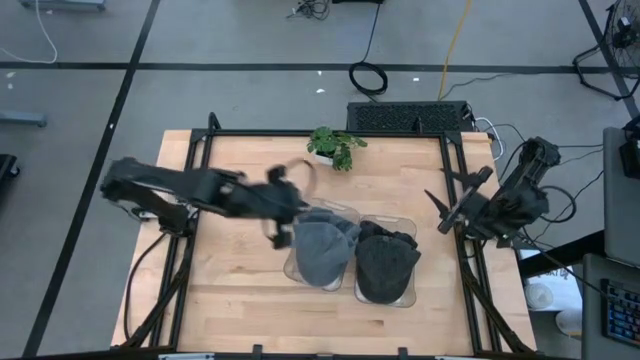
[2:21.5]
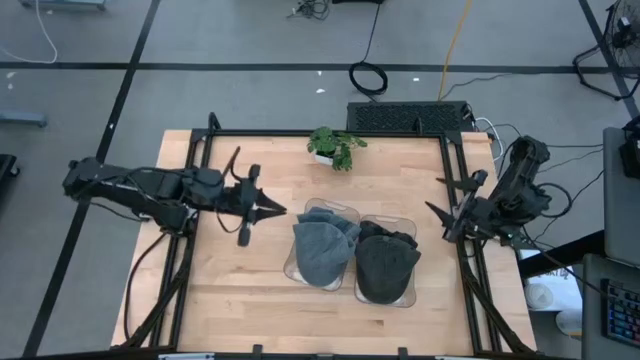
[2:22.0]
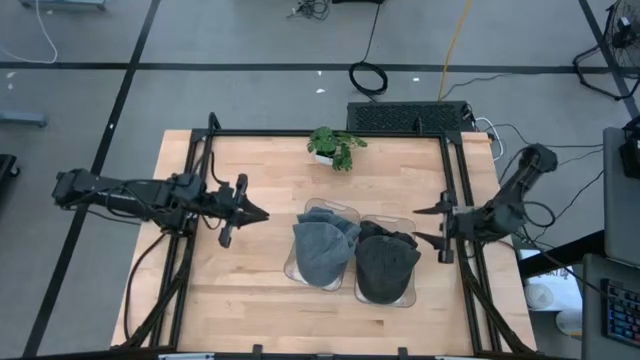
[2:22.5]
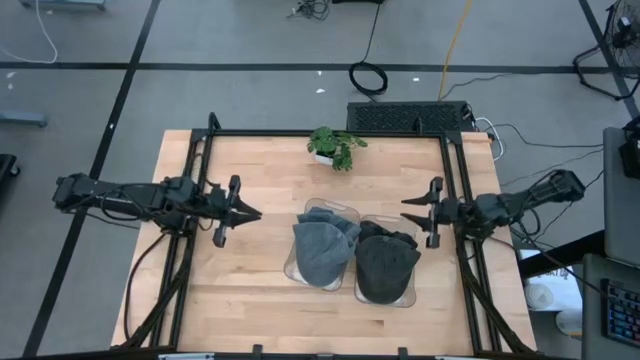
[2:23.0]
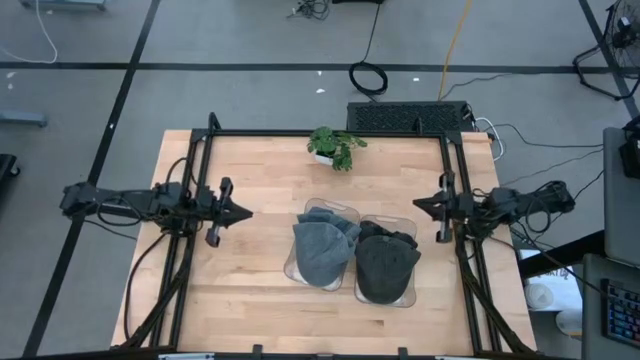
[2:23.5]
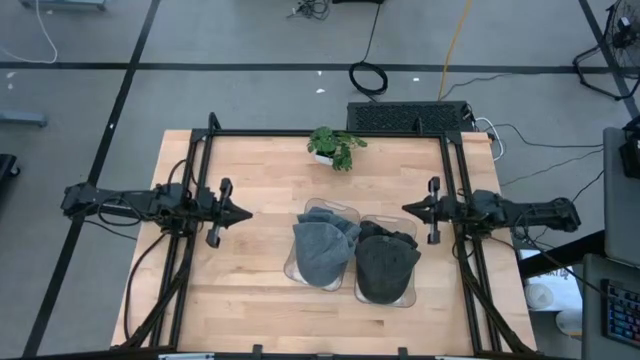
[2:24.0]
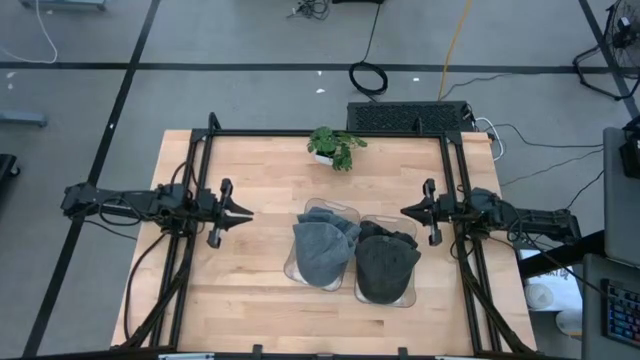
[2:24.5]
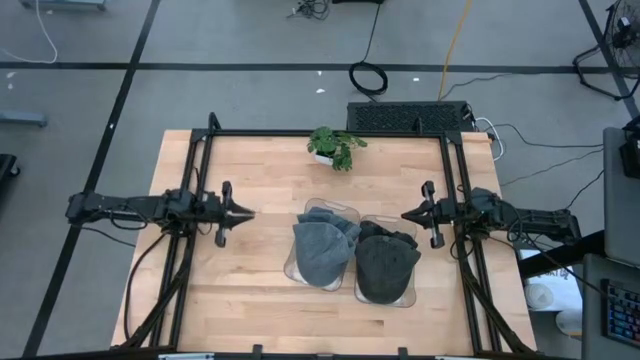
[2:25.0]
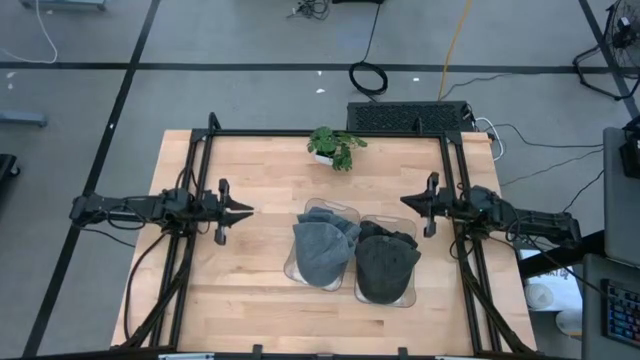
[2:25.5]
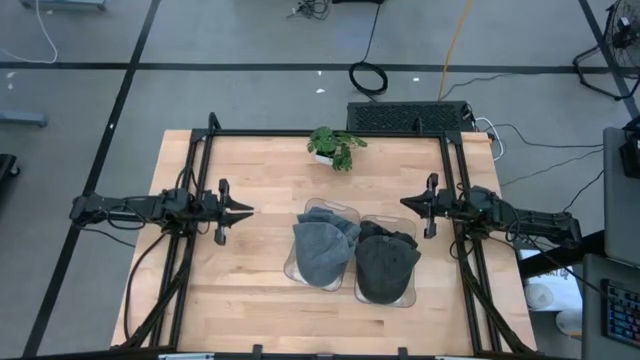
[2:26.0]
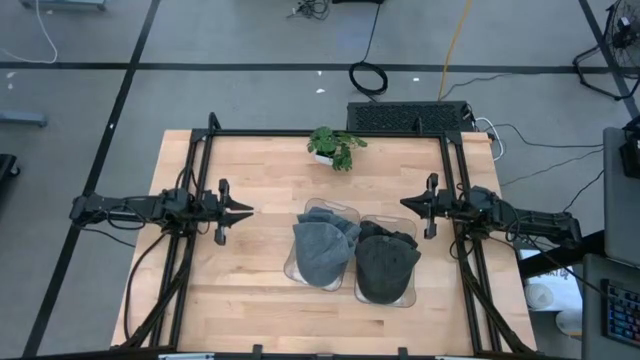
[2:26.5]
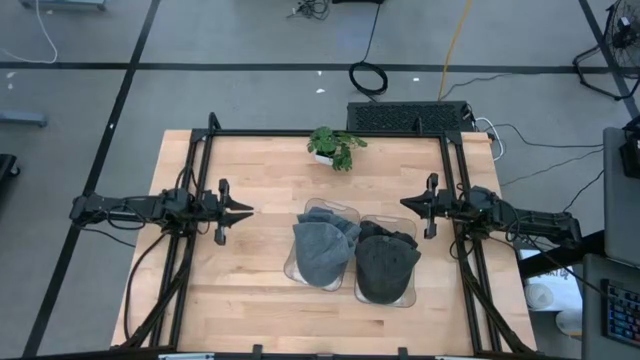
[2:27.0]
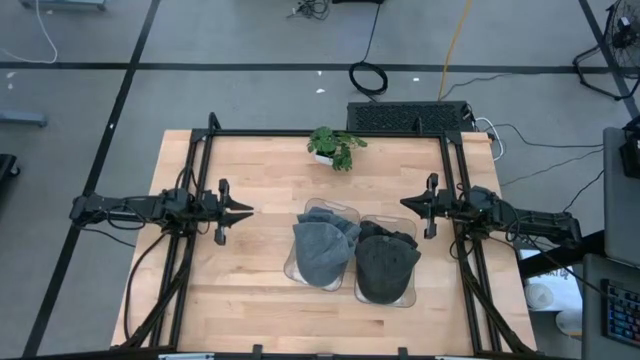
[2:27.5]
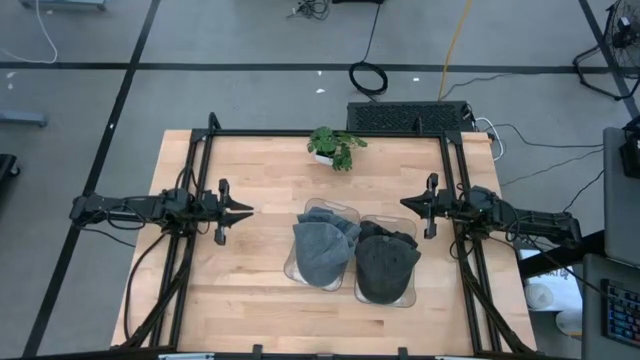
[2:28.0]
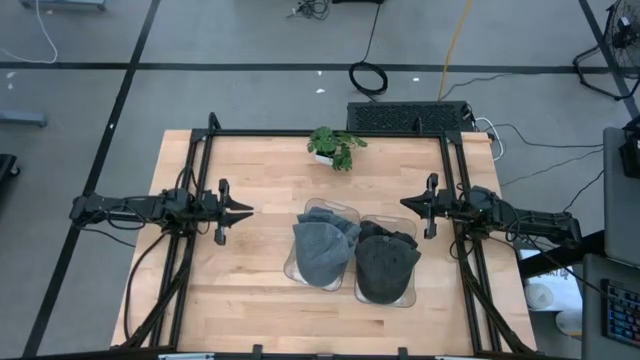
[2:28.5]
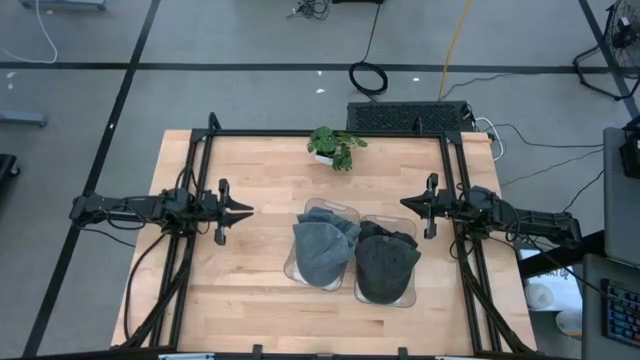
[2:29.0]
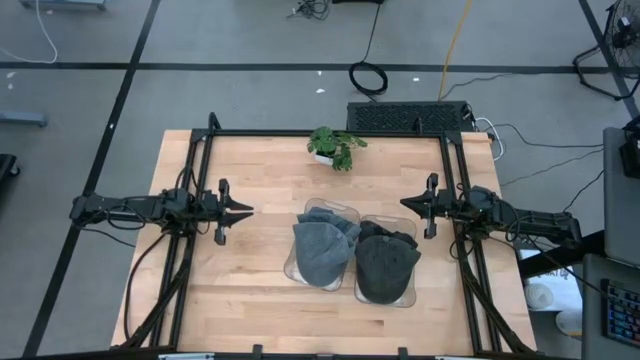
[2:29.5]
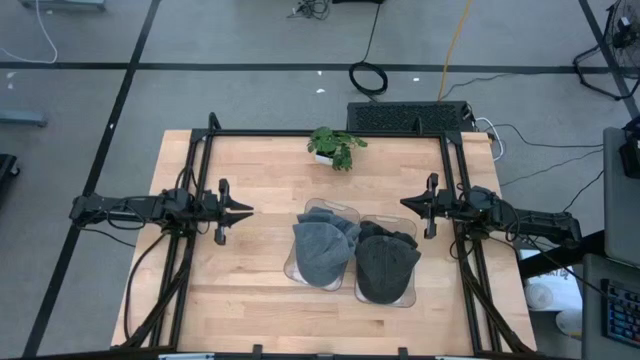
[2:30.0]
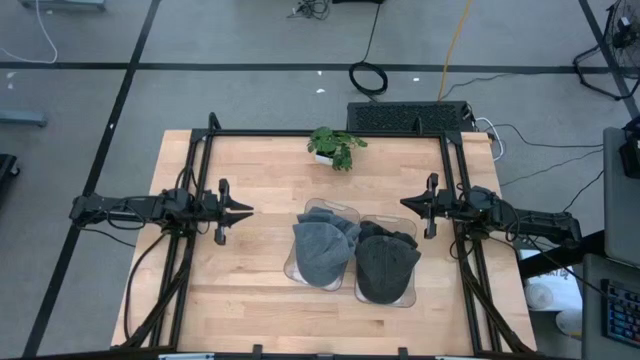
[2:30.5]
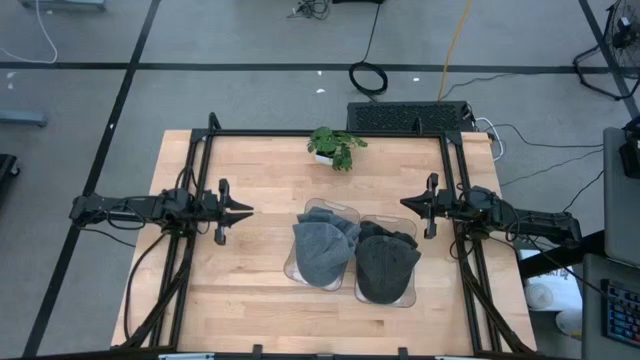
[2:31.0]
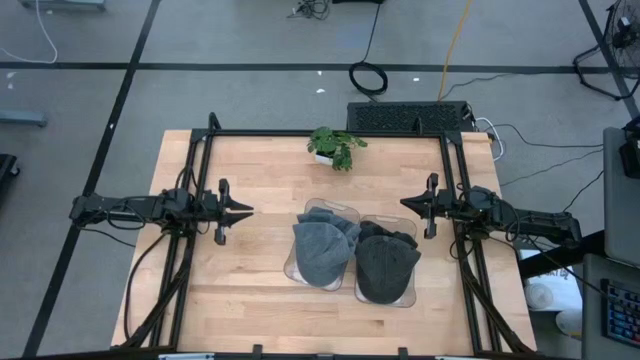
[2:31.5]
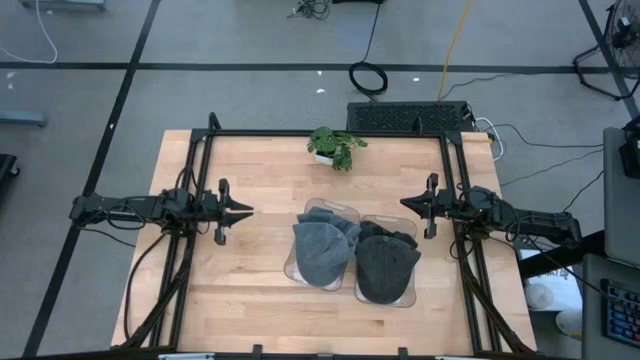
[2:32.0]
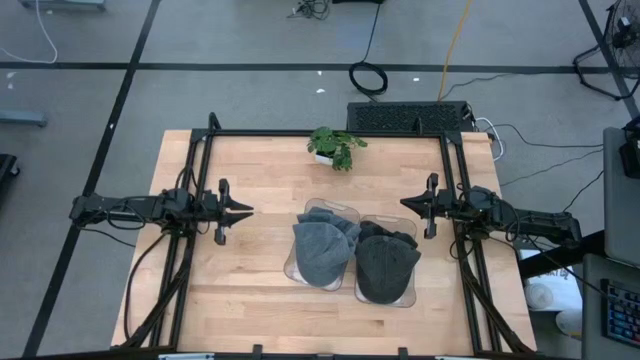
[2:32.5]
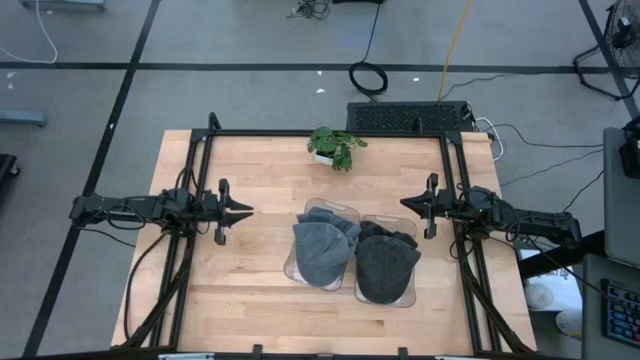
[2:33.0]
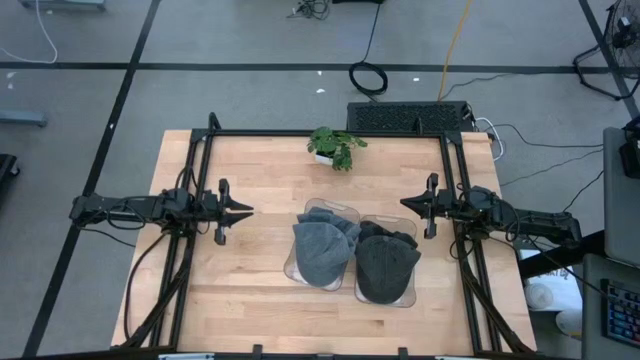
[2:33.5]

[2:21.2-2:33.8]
Task: Pick & Place hat
Return to Home Position

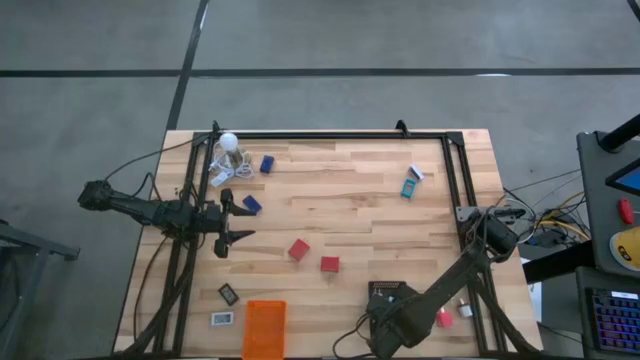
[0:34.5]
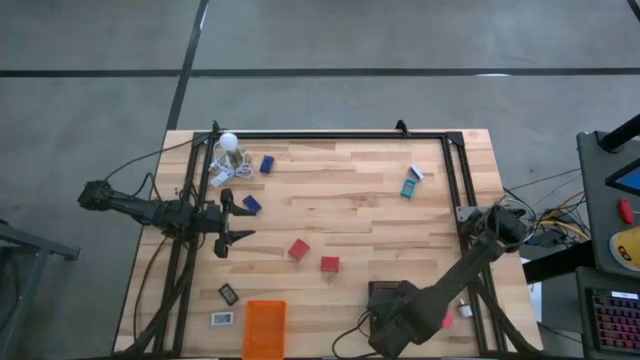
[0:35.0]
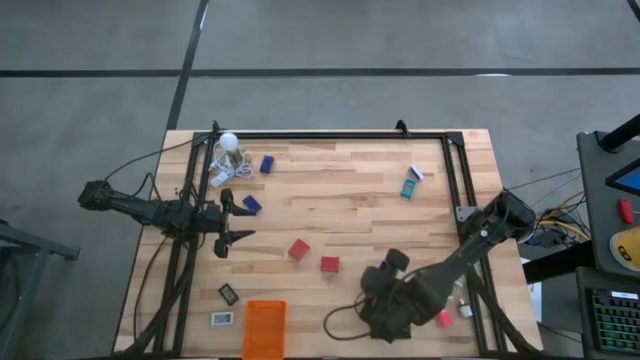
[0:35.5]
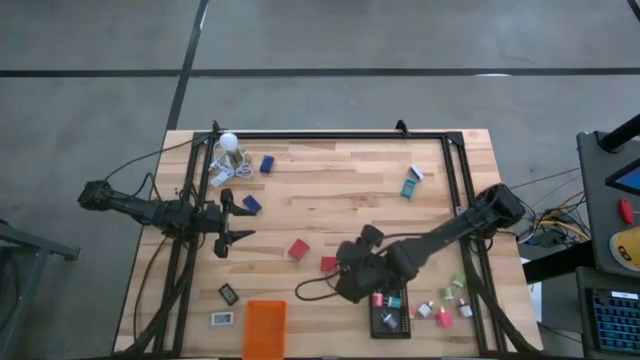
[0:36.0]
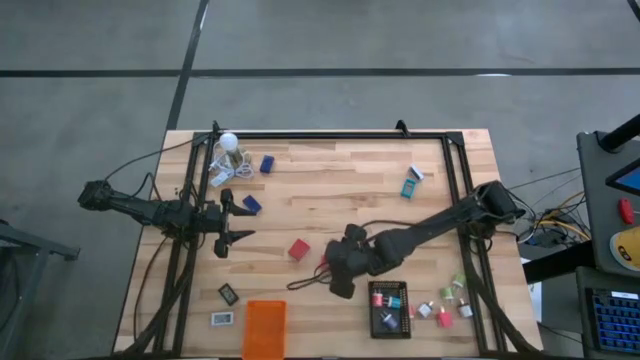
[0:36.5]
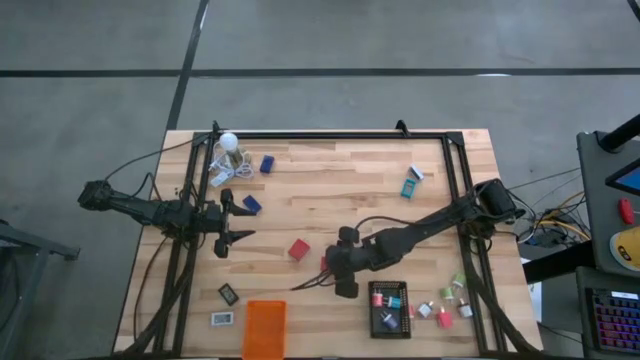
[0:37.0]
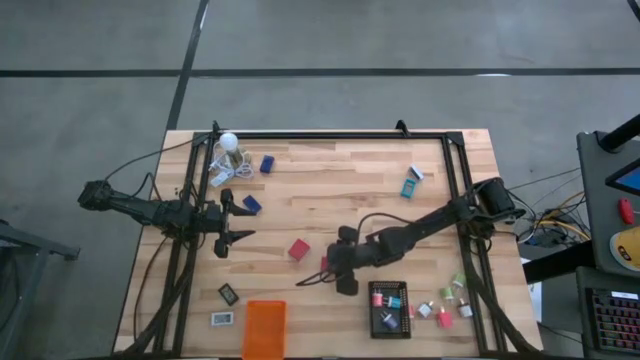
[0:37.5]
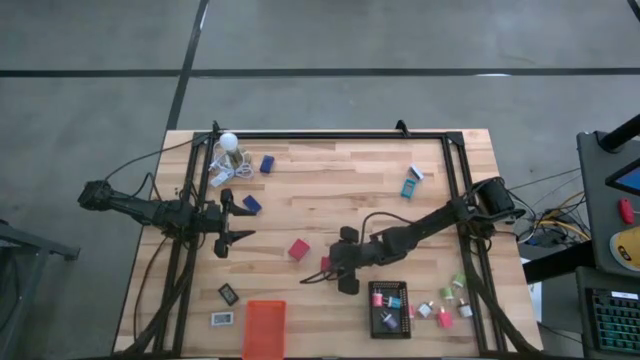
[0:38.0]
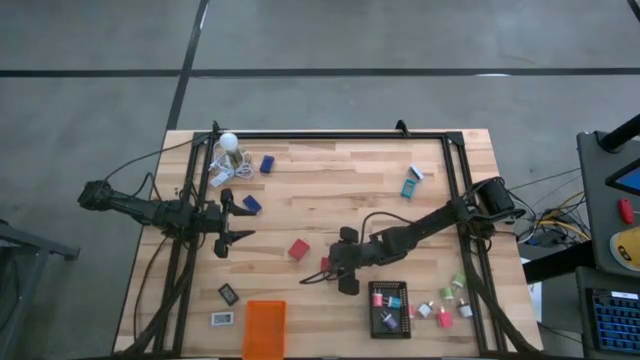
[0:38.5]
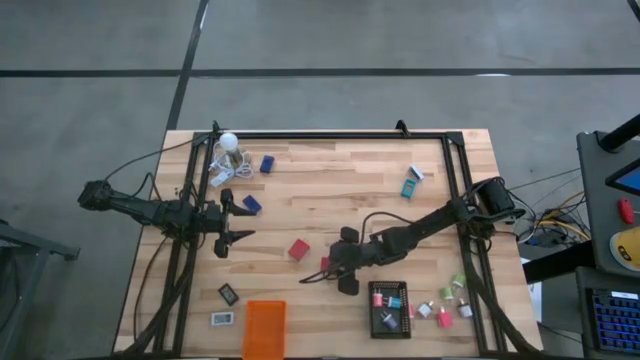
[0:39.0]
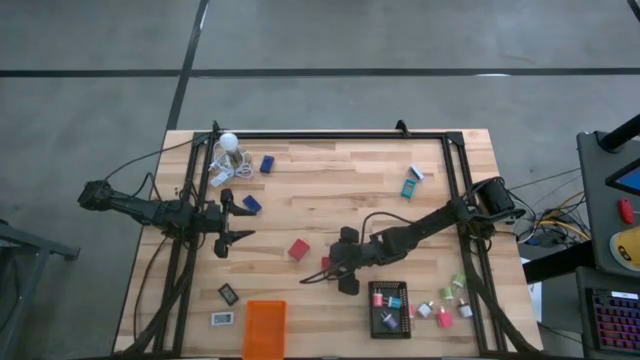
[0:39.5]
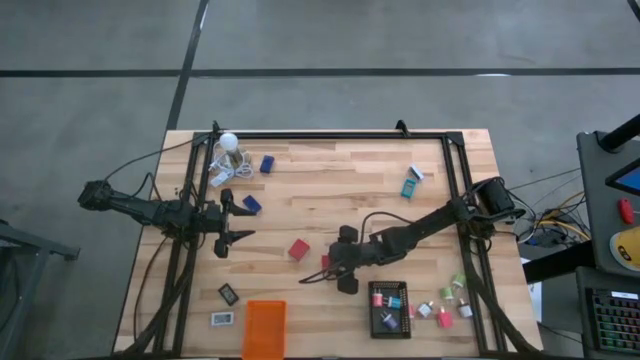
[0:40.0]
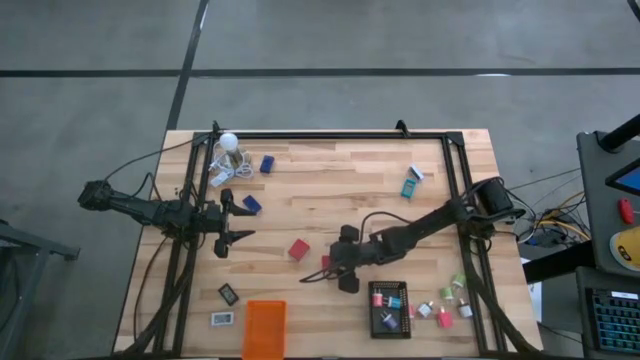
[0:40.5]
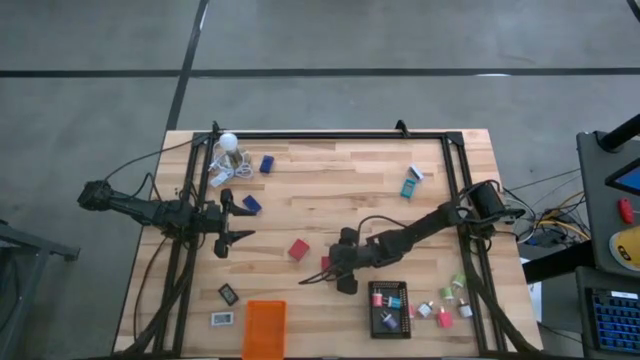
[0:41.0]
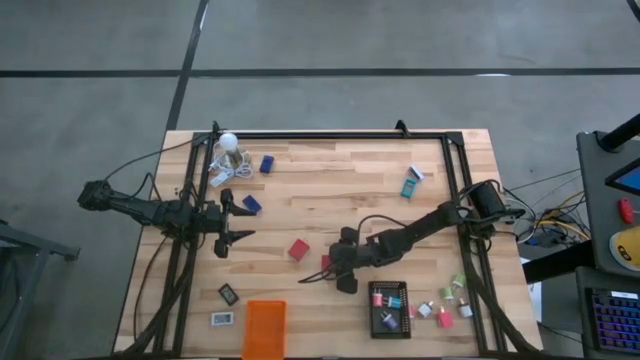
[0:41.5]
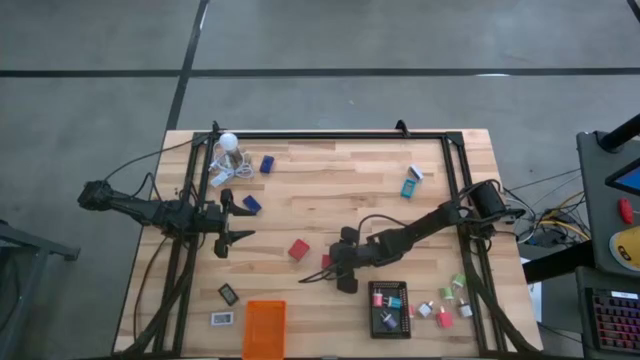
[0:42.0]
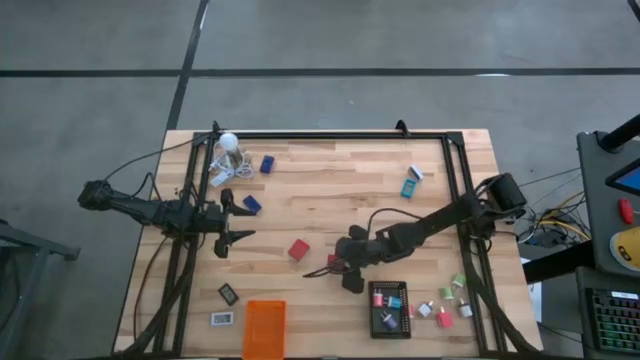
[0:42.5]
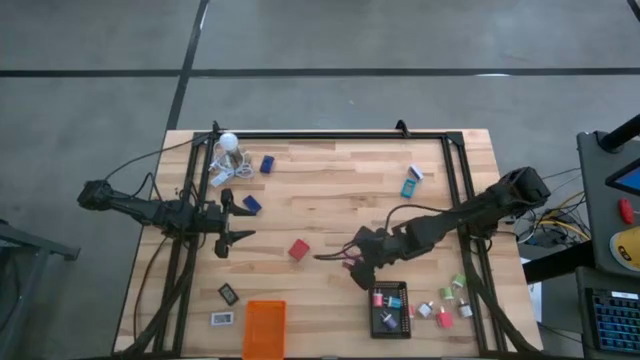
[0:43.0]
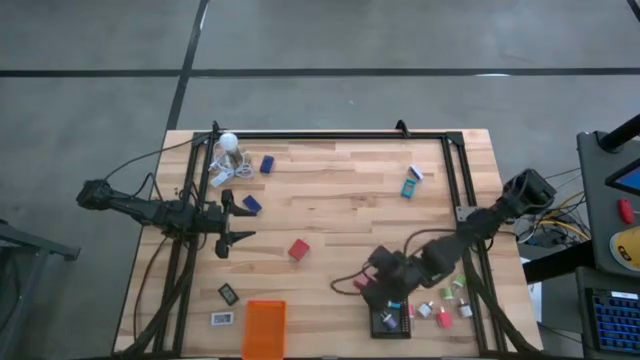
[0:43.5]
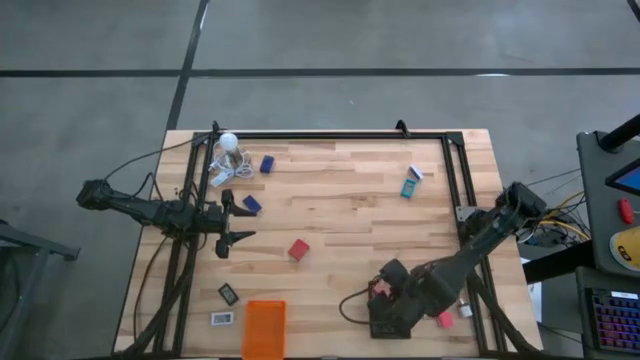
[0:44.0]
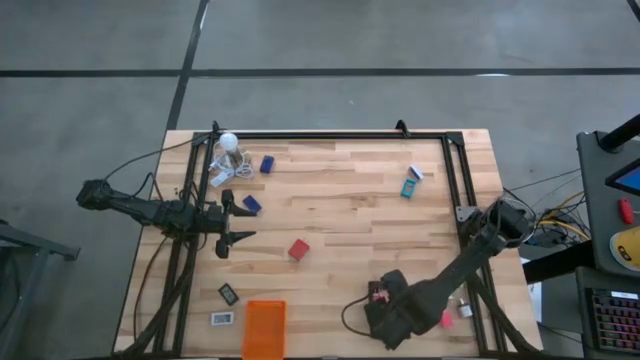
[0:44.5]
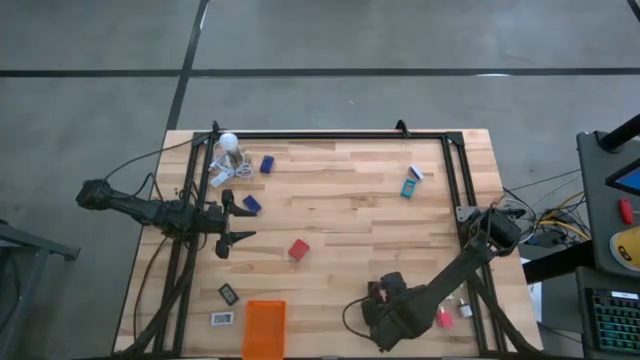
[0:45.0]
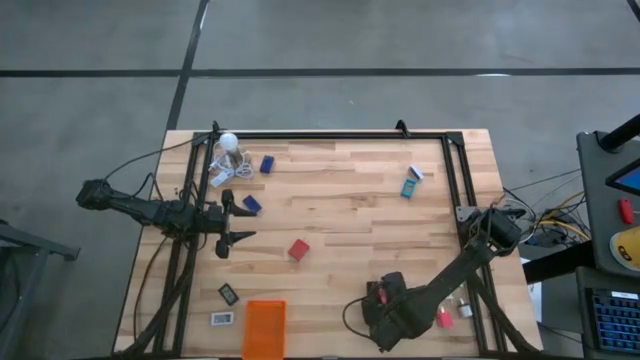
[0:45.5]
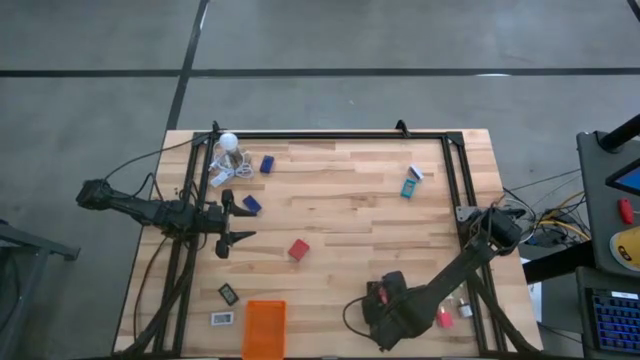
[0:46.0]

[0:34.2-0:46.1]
Task: Pick & Place Office items
Put the right red charger adapter into the black bin
